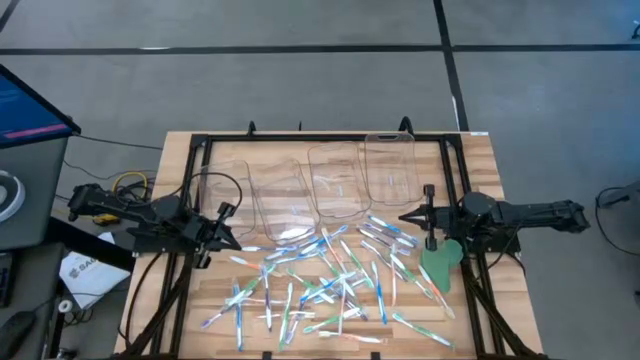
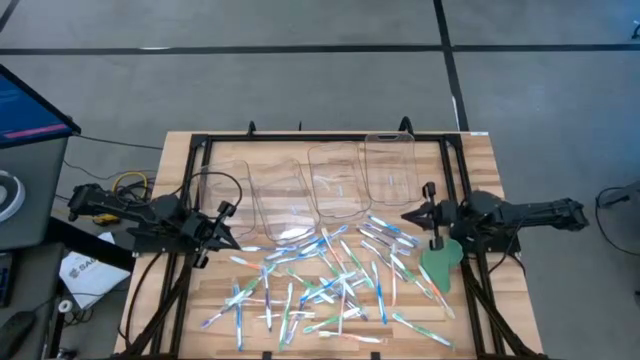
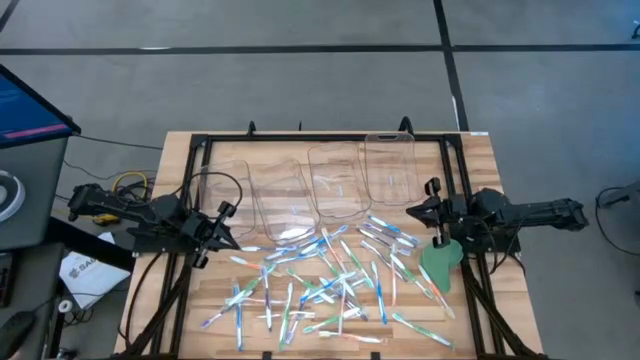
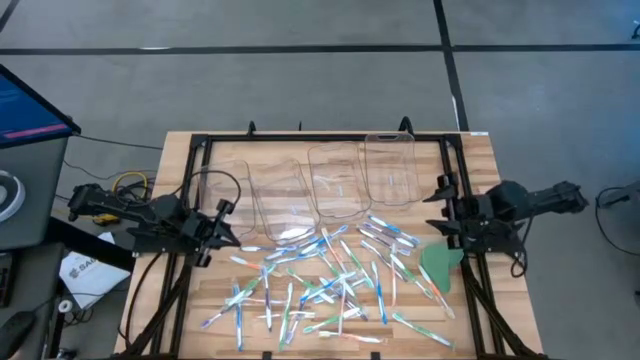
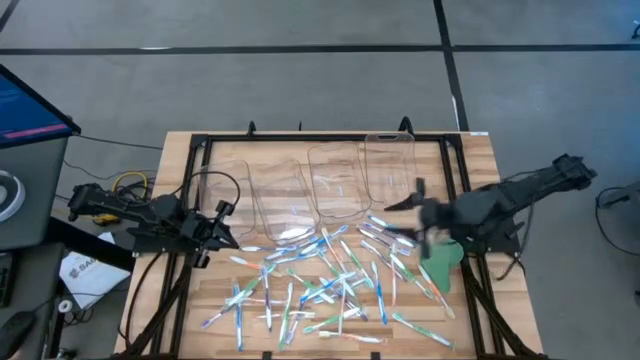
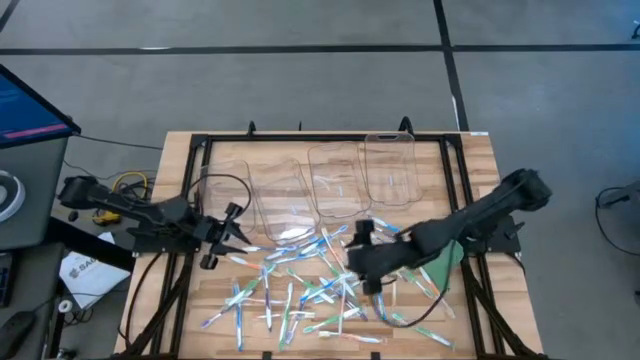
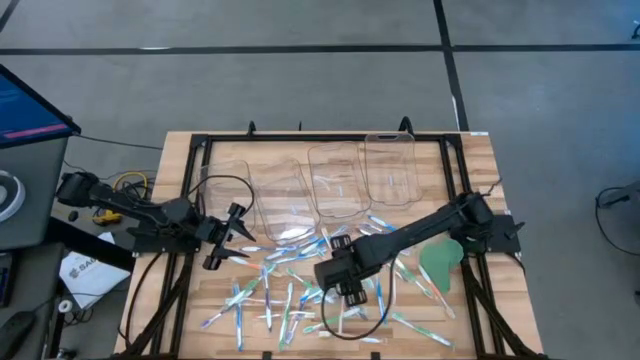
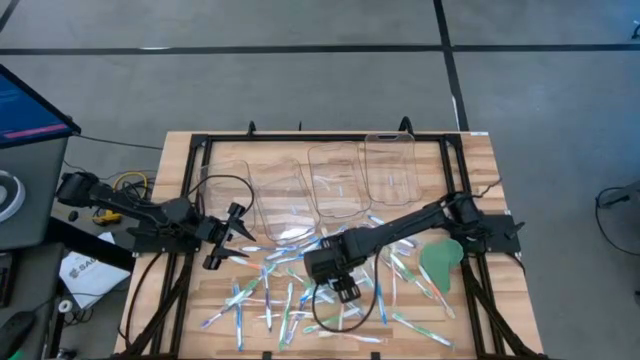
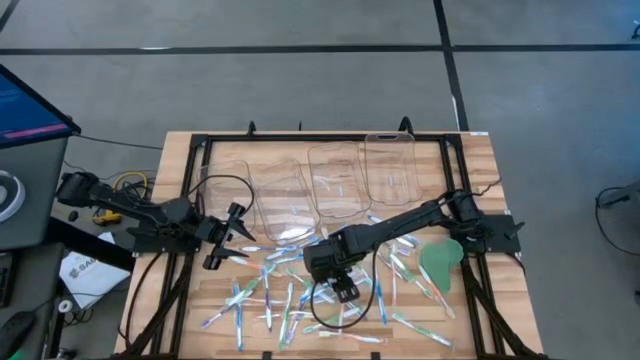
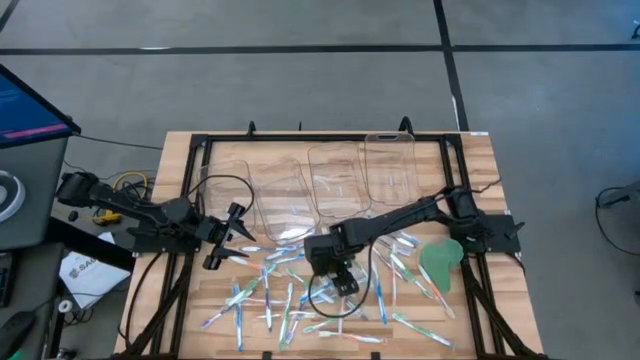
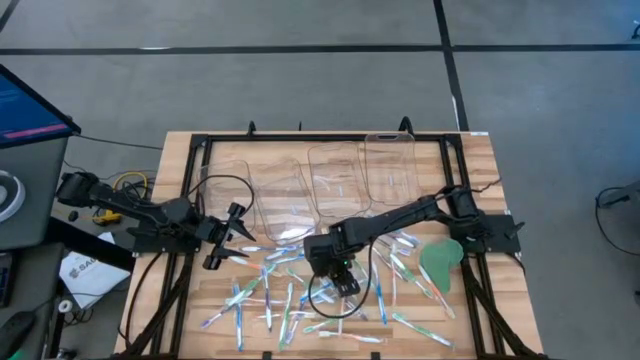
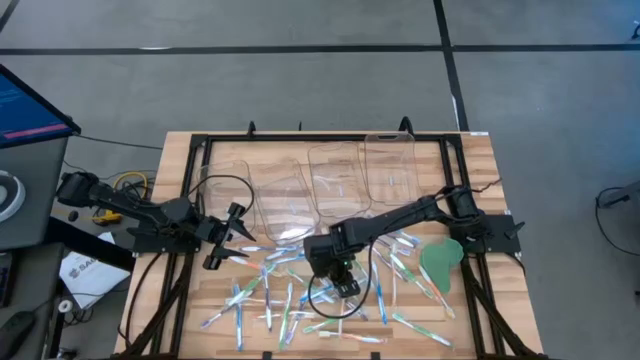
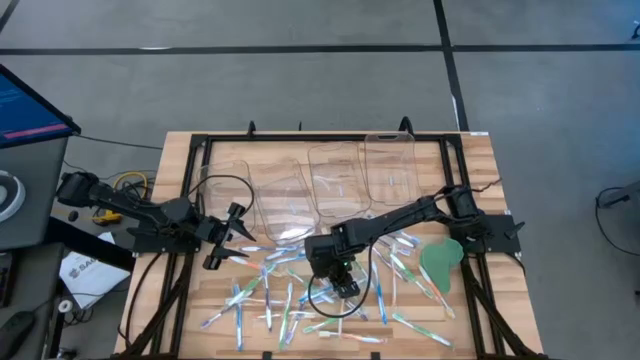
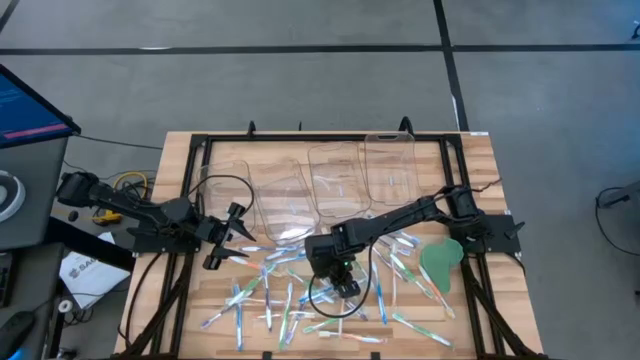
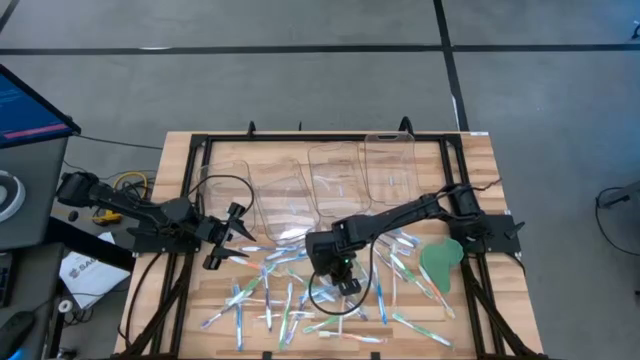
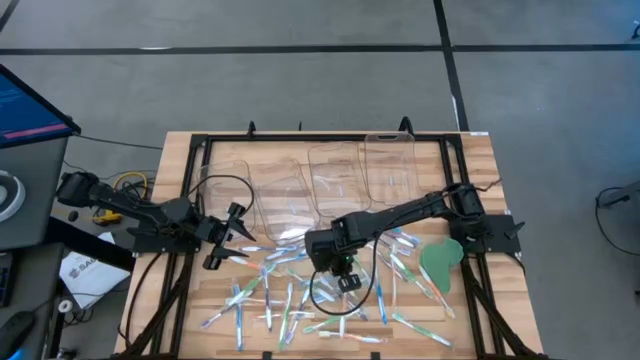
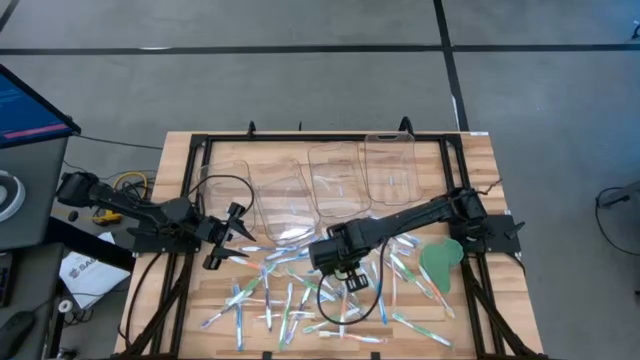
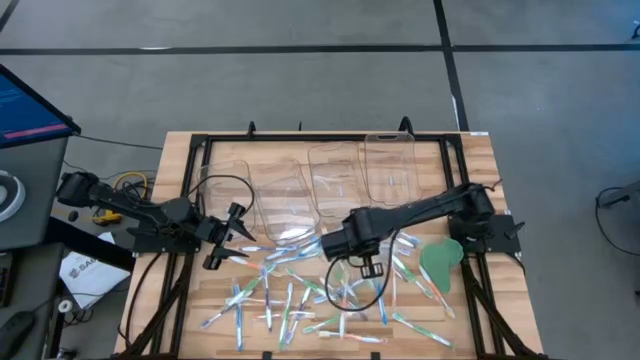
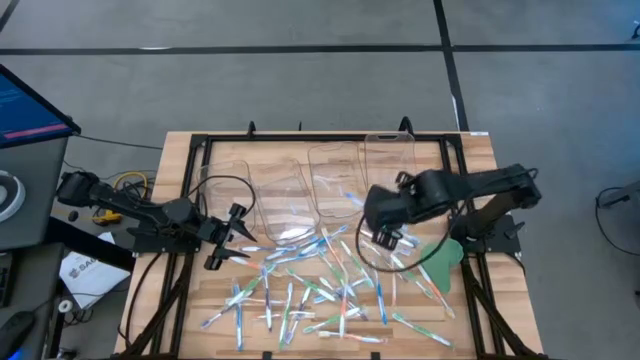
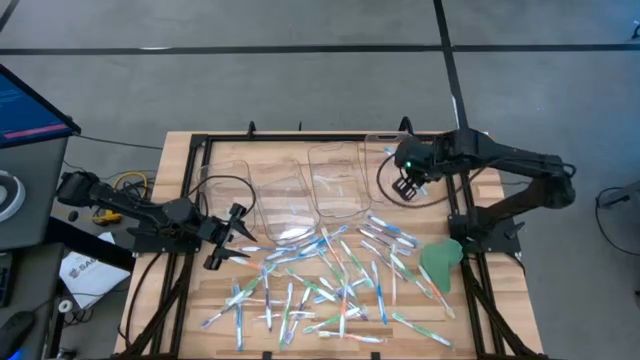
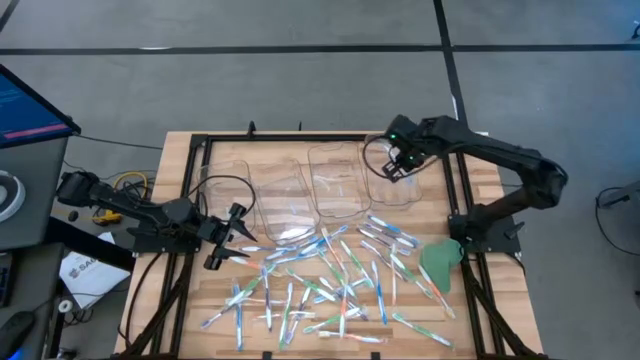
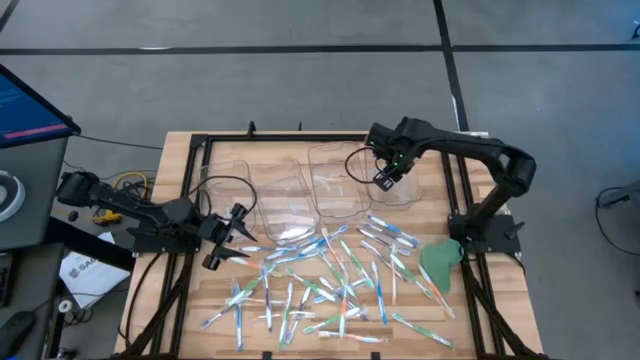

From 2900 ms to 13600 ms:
Task: Pick & Place Toothbrushes
Put the blue toothbrush into the right transparent bin

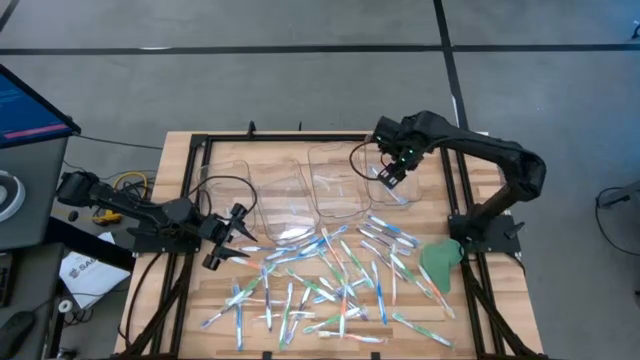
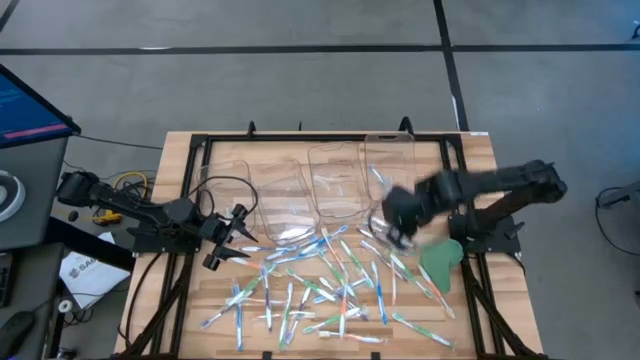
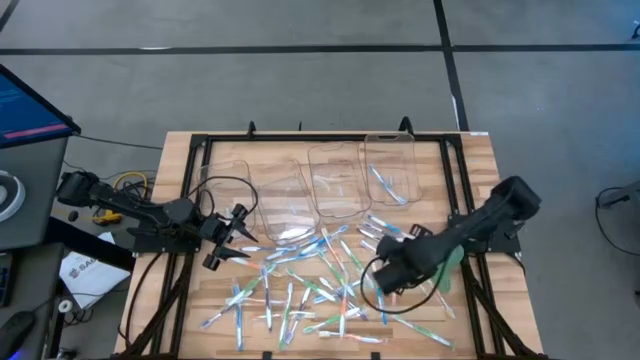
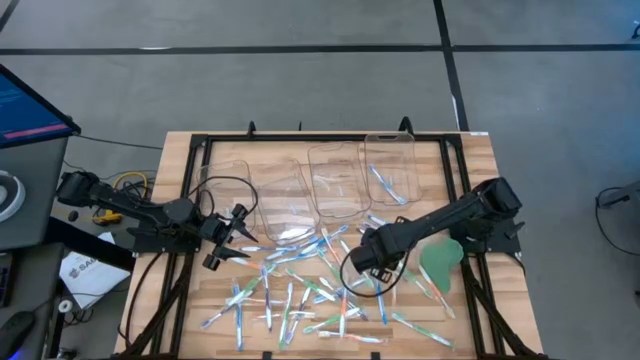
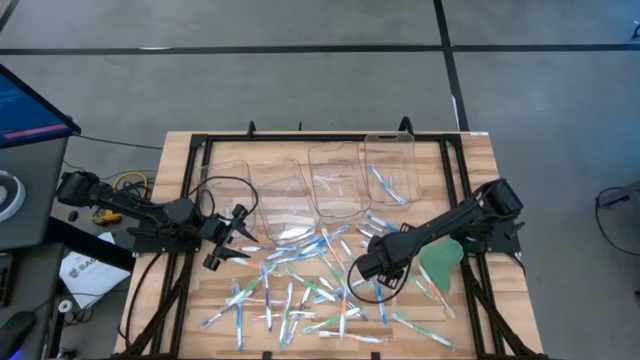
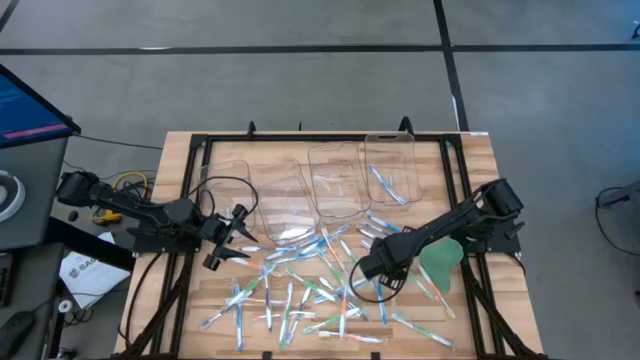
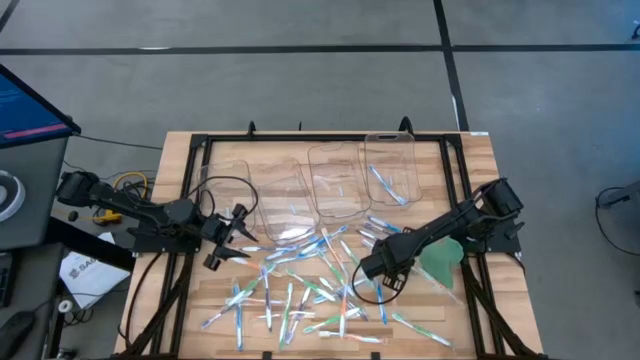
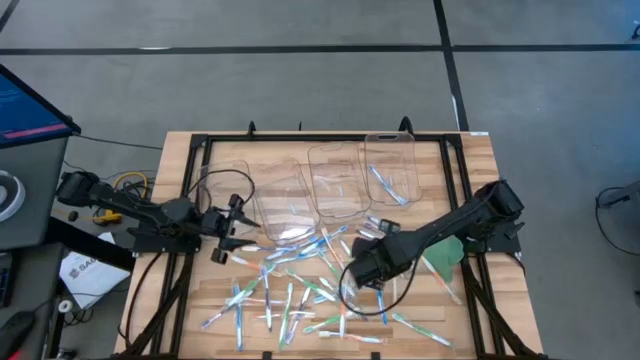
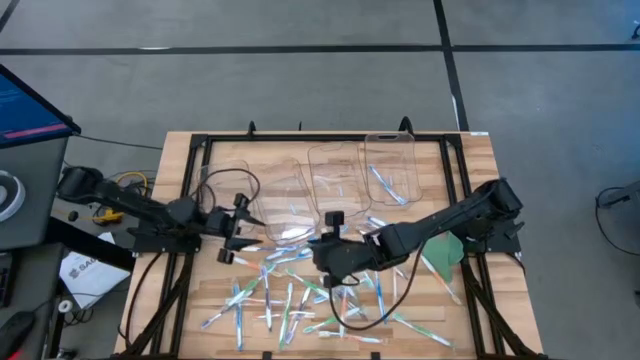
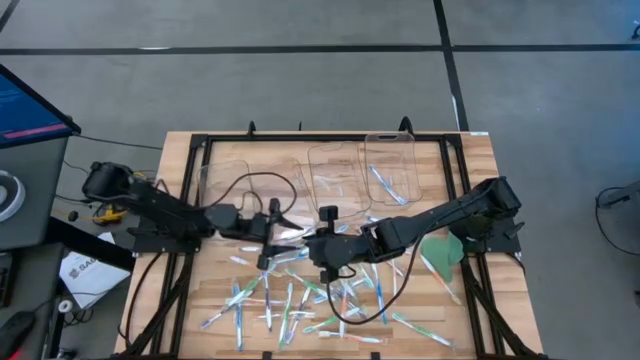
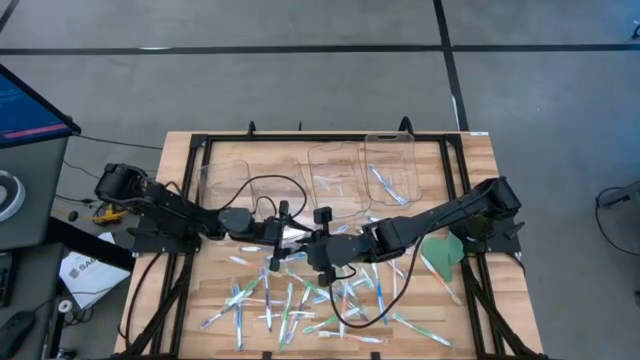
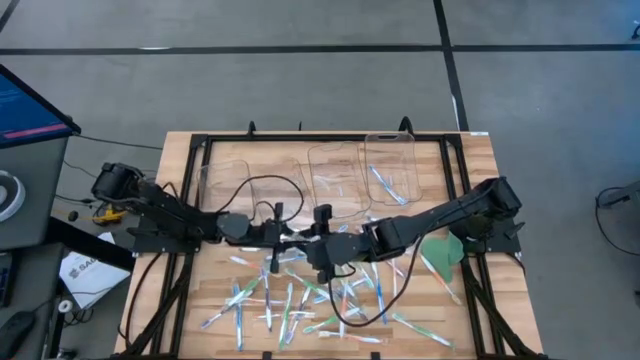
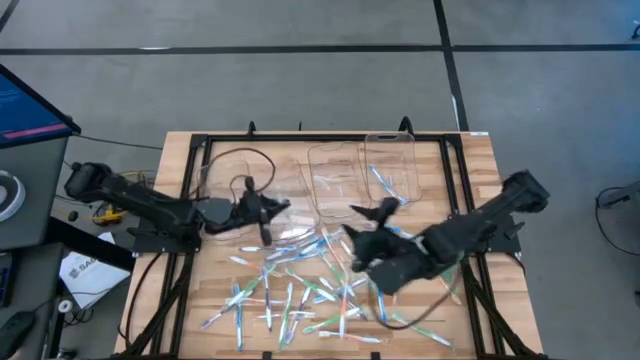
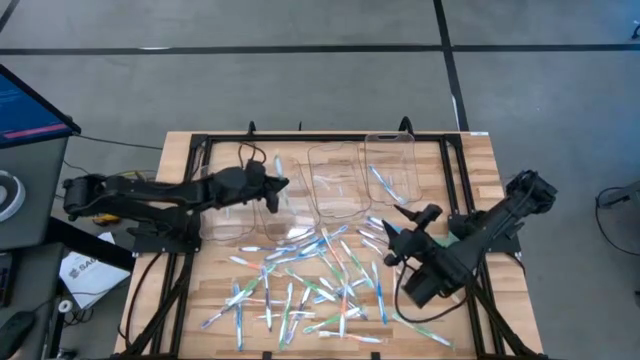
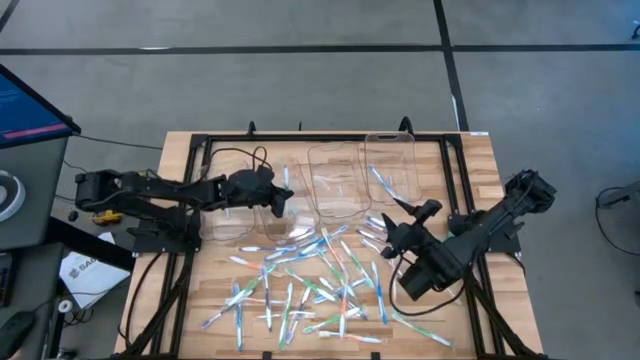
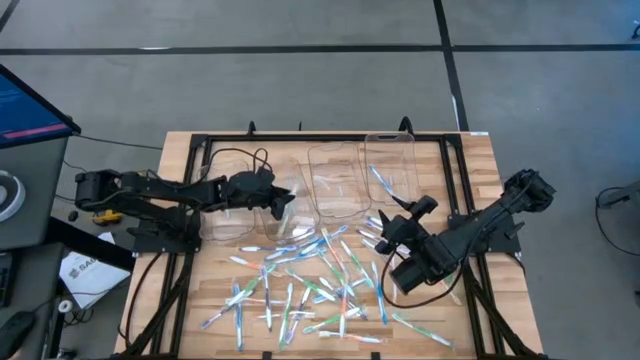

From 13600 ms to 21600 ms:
Put the green toothbrush into the middle left transparent bin

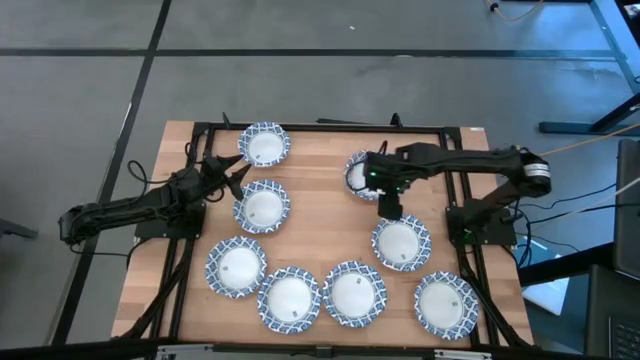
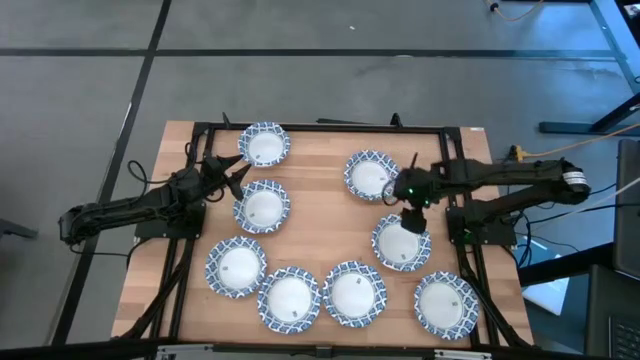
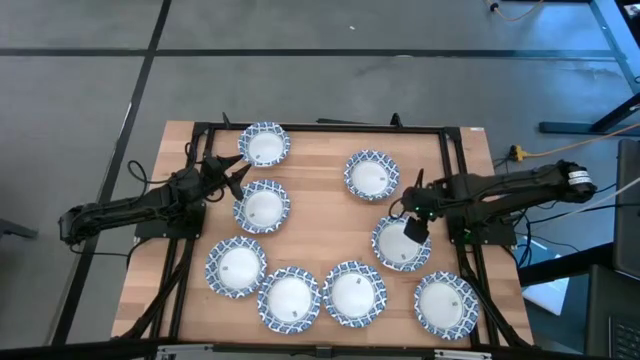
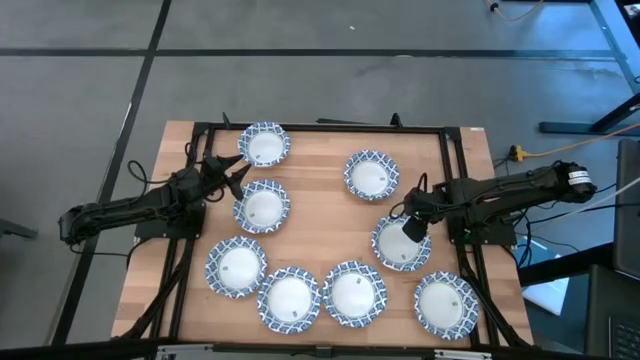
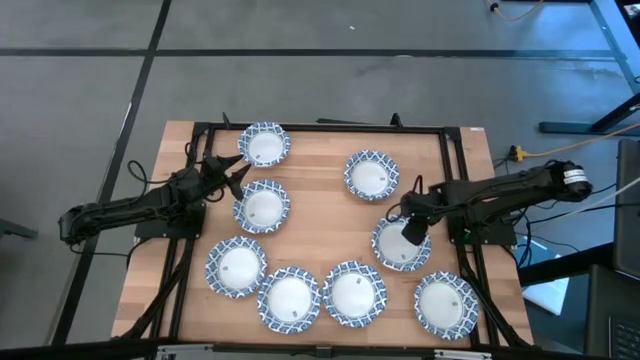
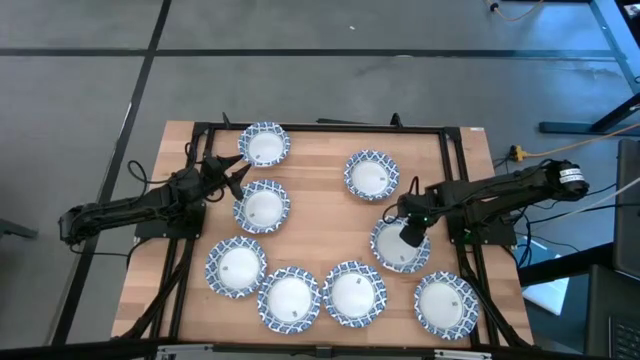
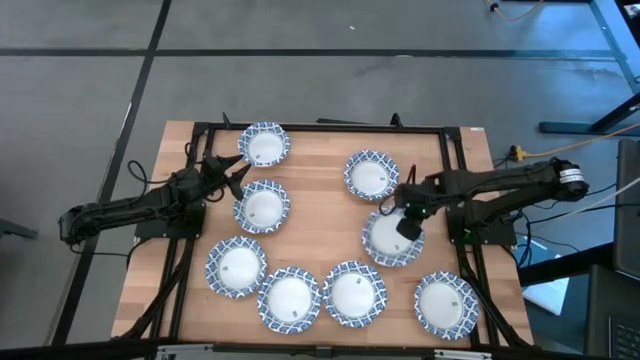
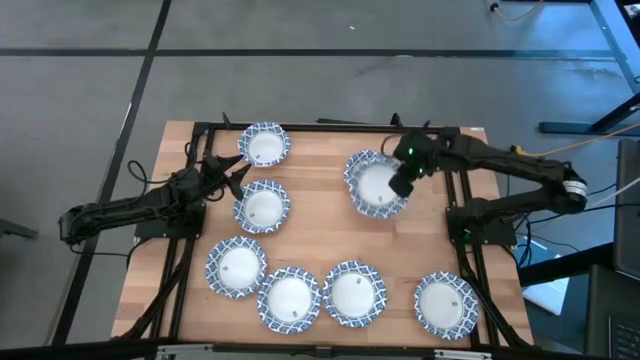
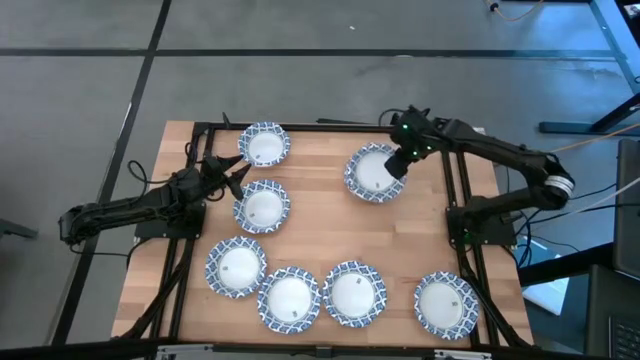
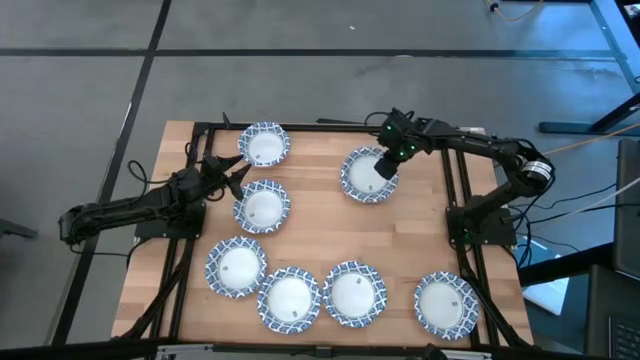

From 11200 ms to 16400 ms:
Task: Nest bowls inside each other
Stack the white bowl on the white bowl
